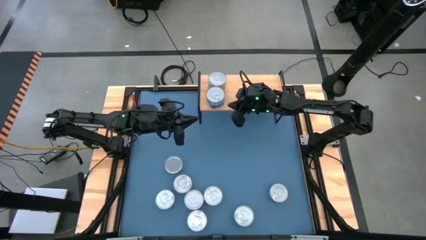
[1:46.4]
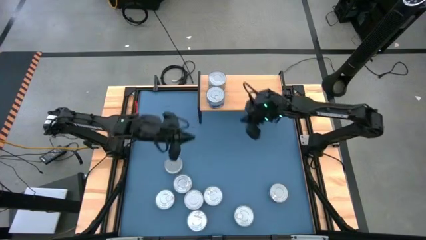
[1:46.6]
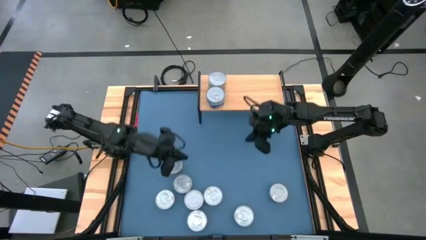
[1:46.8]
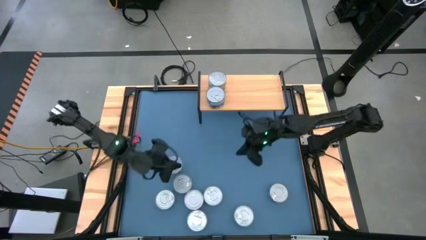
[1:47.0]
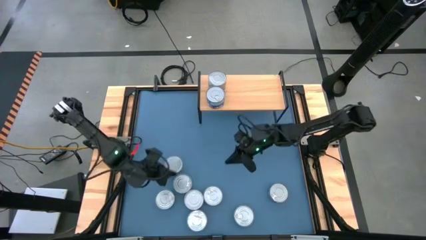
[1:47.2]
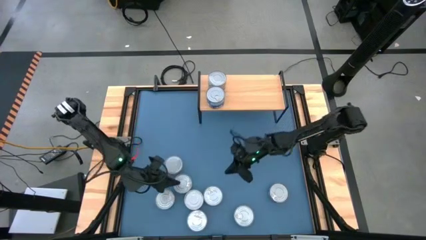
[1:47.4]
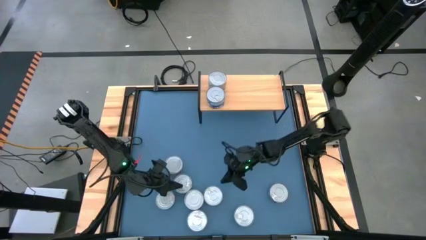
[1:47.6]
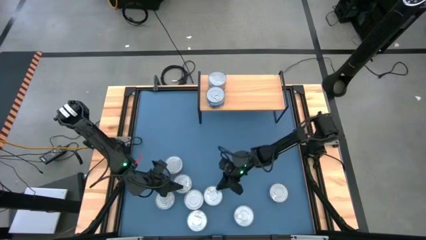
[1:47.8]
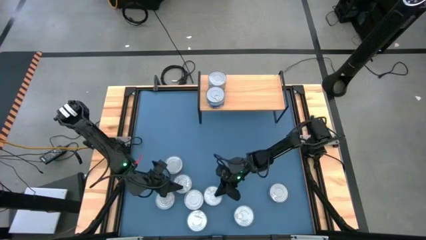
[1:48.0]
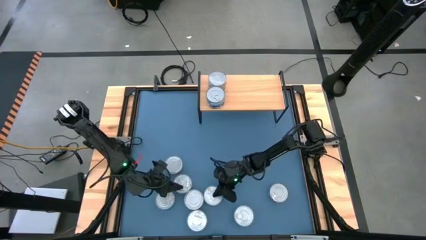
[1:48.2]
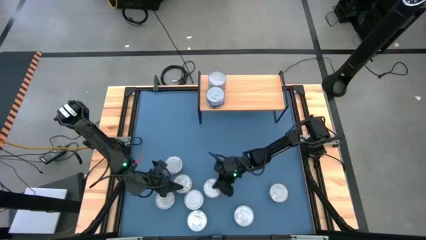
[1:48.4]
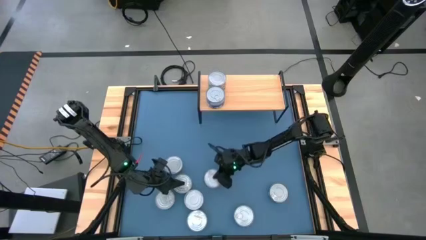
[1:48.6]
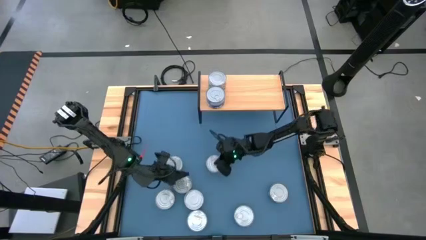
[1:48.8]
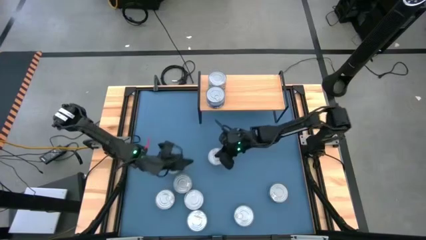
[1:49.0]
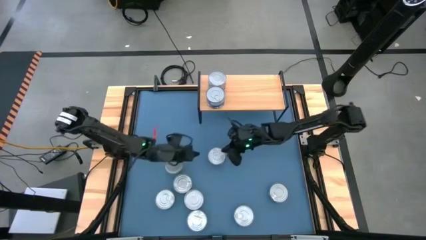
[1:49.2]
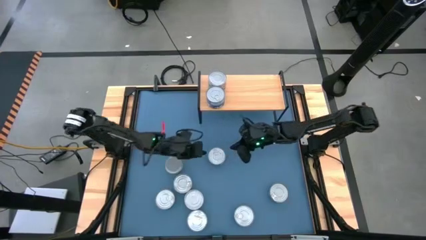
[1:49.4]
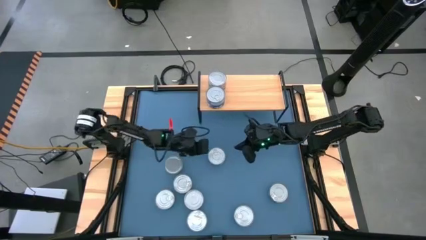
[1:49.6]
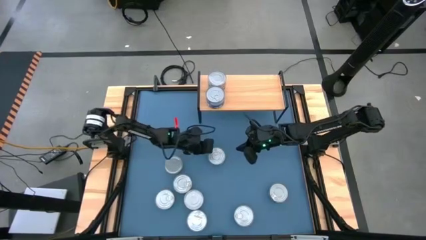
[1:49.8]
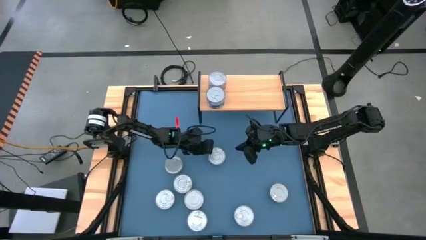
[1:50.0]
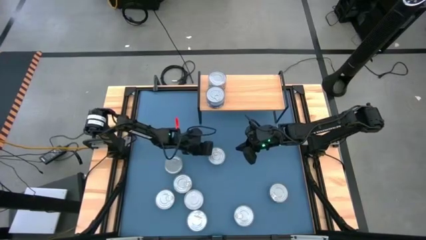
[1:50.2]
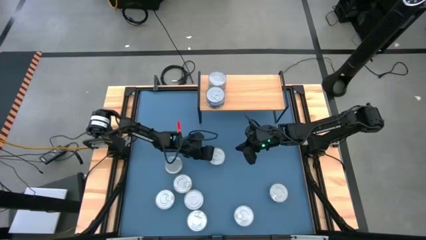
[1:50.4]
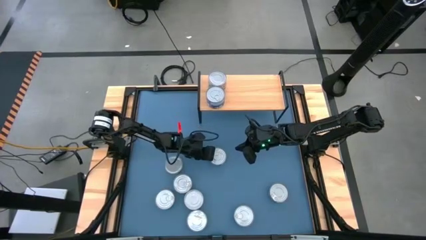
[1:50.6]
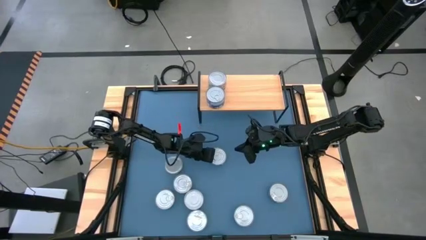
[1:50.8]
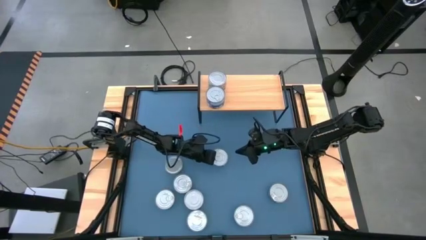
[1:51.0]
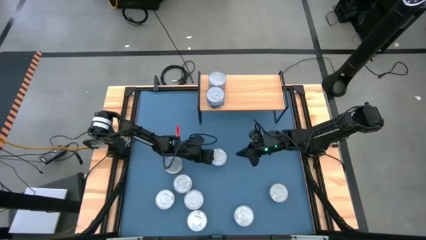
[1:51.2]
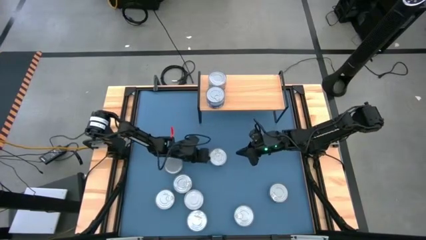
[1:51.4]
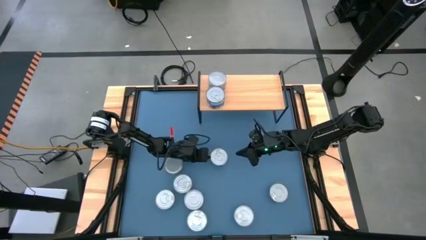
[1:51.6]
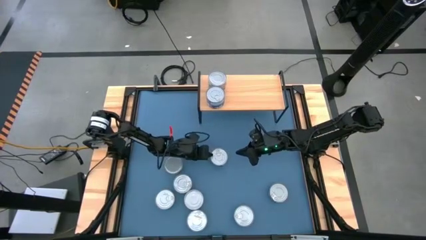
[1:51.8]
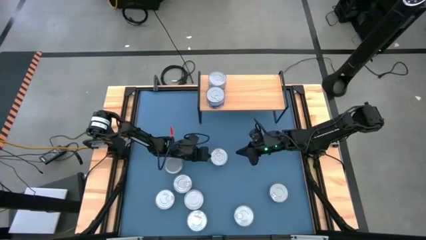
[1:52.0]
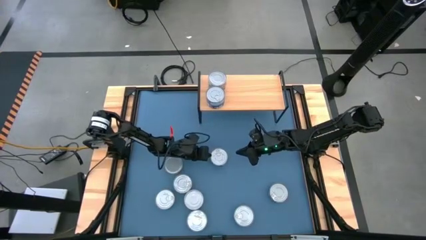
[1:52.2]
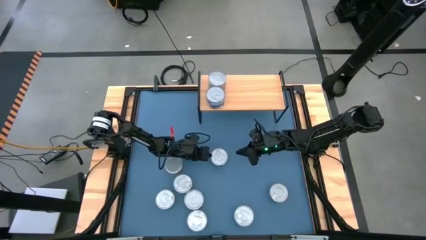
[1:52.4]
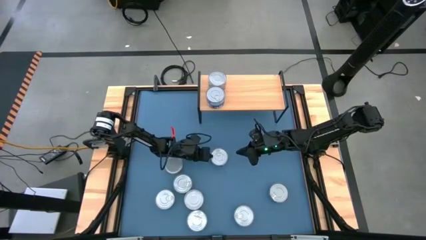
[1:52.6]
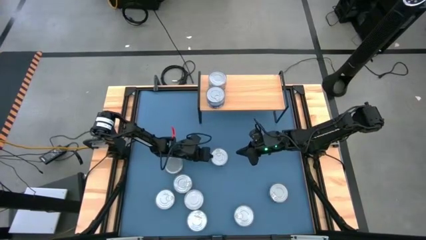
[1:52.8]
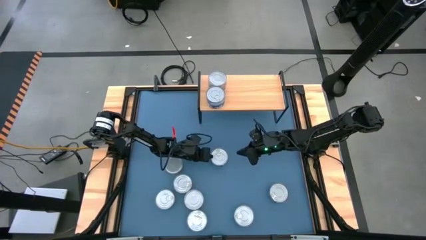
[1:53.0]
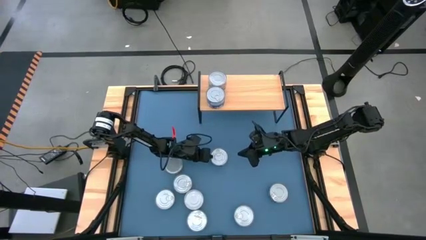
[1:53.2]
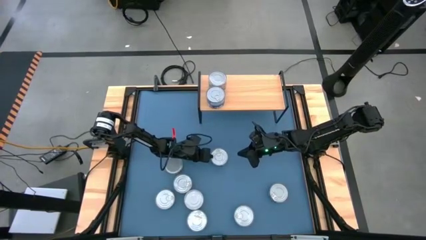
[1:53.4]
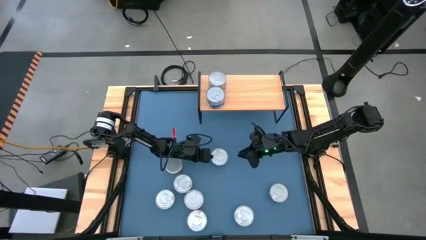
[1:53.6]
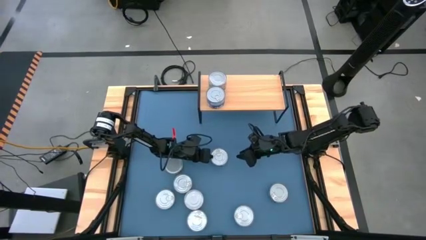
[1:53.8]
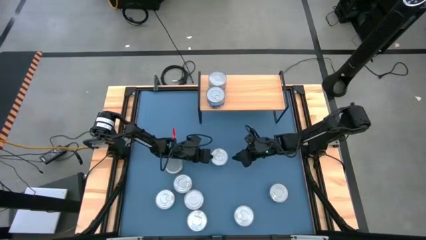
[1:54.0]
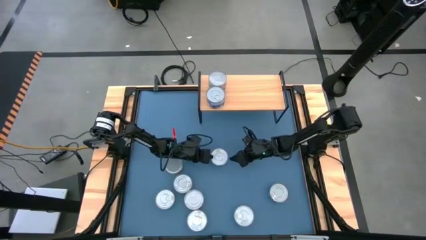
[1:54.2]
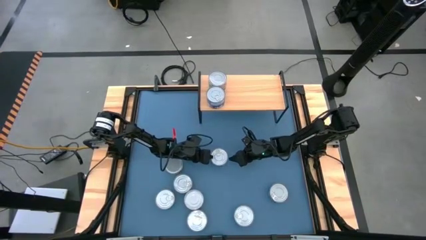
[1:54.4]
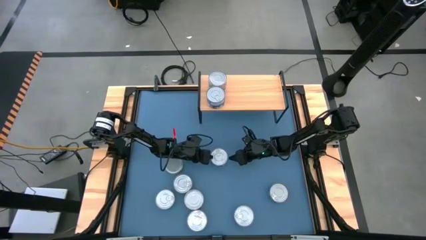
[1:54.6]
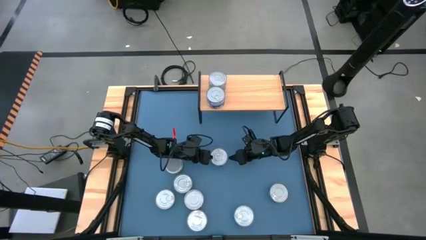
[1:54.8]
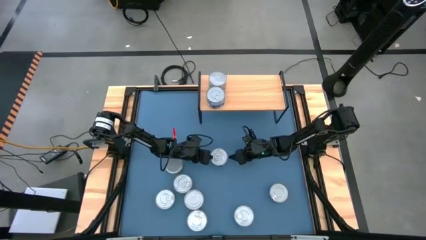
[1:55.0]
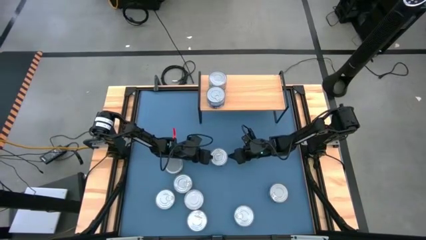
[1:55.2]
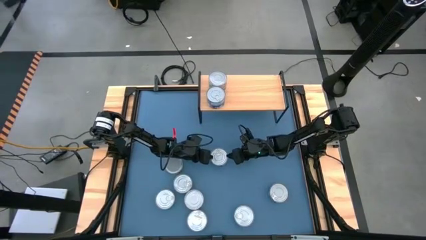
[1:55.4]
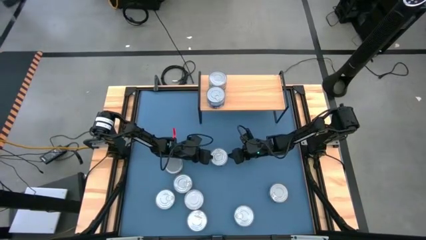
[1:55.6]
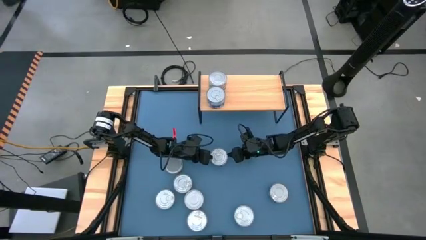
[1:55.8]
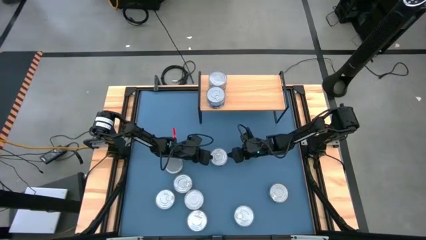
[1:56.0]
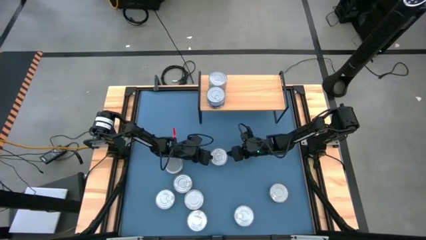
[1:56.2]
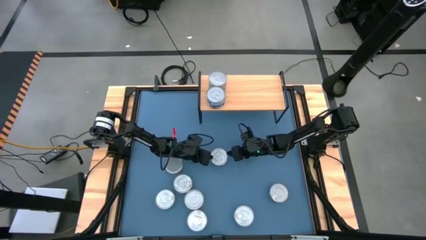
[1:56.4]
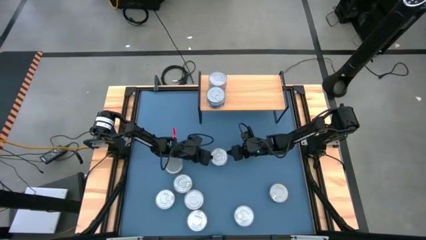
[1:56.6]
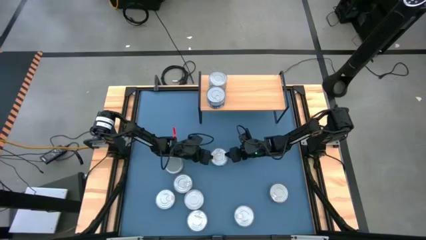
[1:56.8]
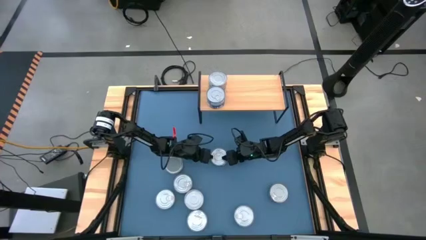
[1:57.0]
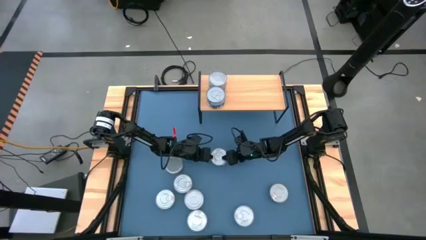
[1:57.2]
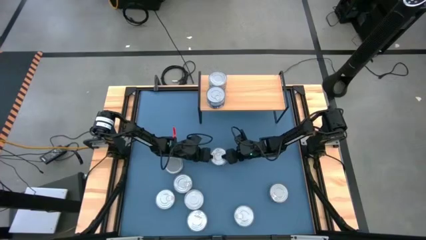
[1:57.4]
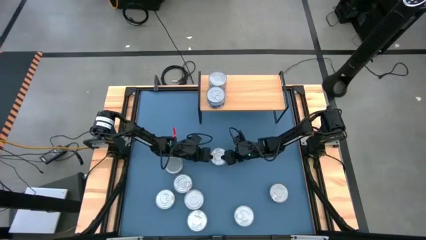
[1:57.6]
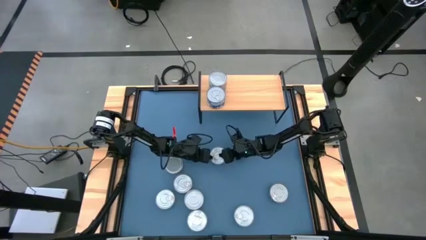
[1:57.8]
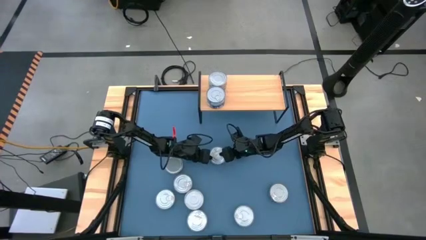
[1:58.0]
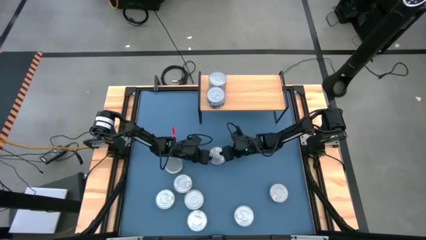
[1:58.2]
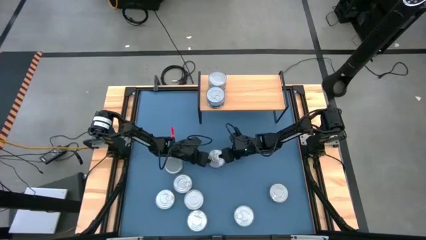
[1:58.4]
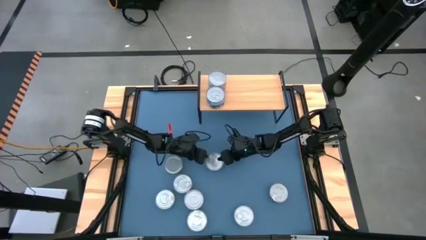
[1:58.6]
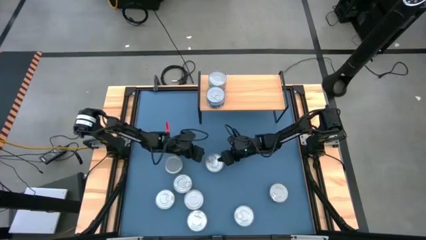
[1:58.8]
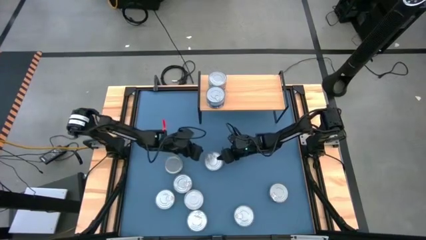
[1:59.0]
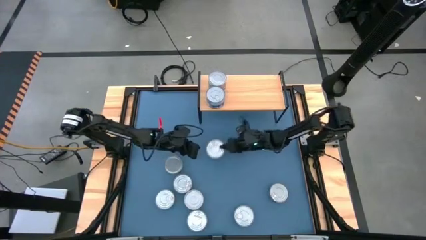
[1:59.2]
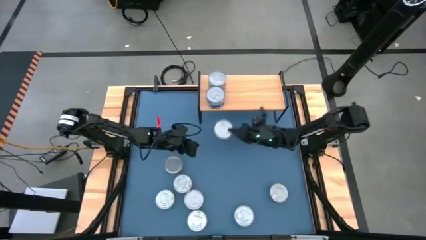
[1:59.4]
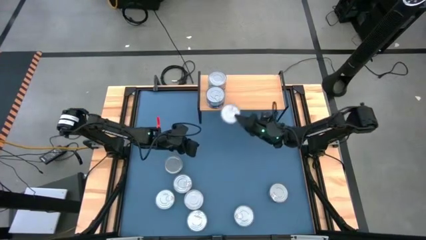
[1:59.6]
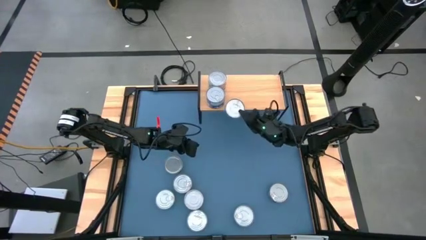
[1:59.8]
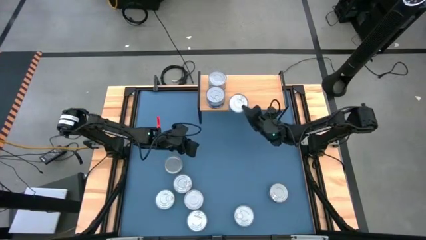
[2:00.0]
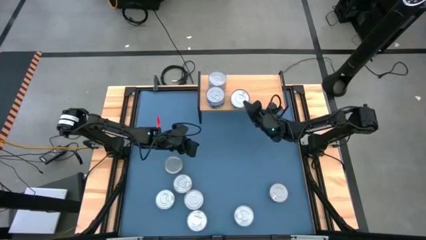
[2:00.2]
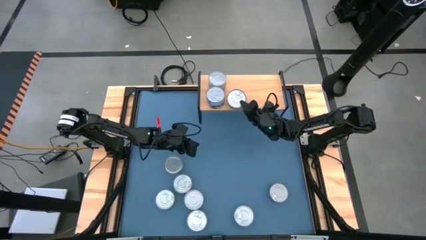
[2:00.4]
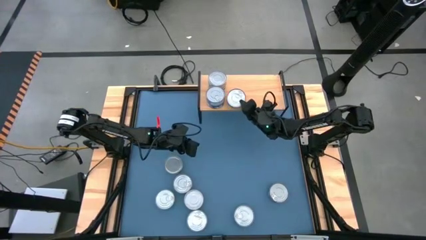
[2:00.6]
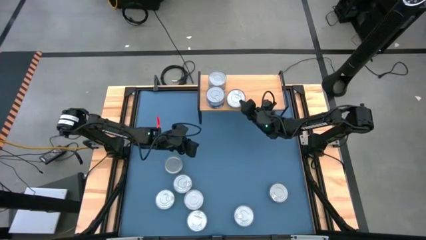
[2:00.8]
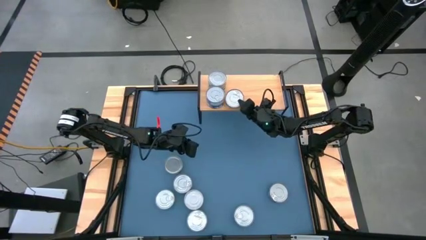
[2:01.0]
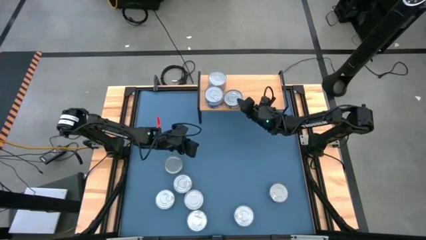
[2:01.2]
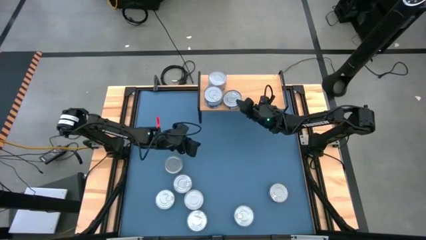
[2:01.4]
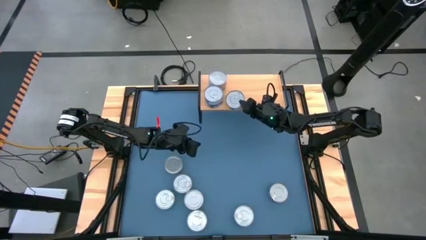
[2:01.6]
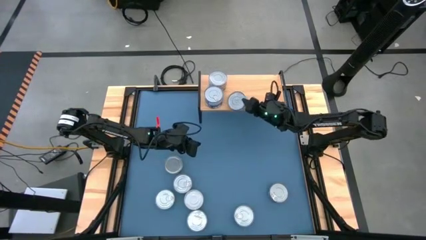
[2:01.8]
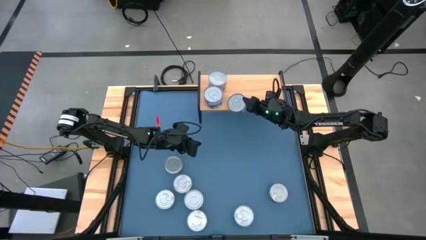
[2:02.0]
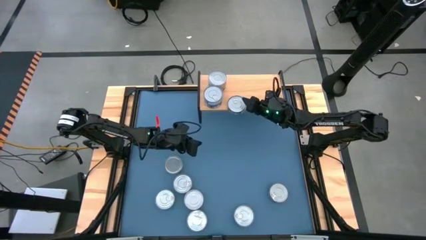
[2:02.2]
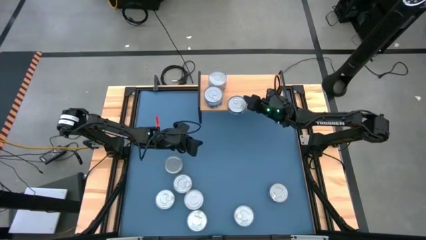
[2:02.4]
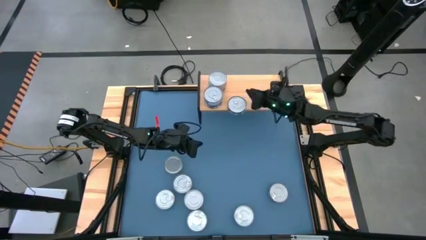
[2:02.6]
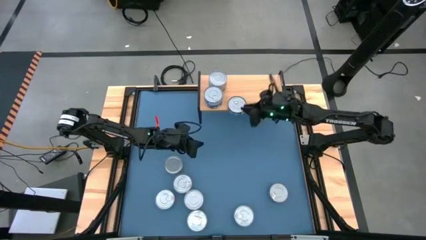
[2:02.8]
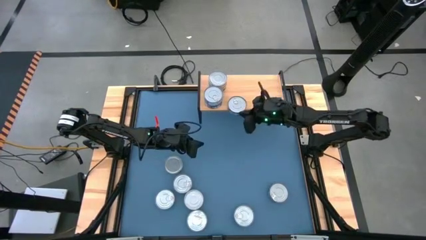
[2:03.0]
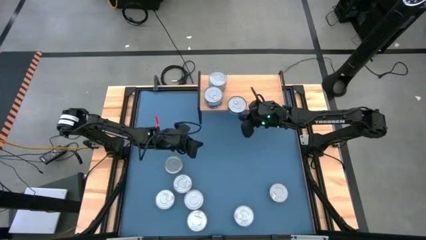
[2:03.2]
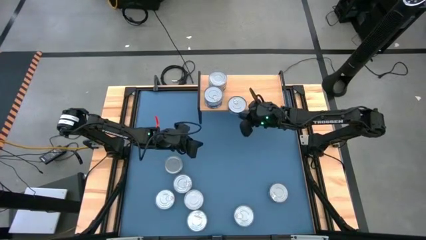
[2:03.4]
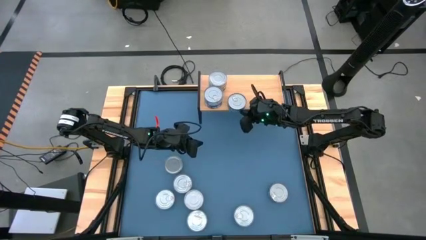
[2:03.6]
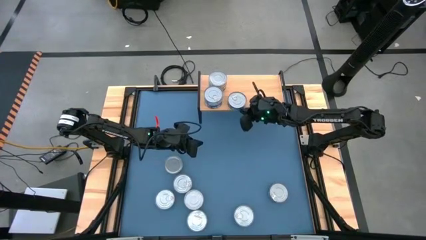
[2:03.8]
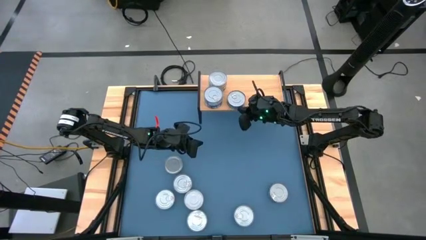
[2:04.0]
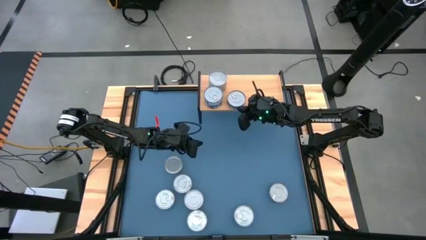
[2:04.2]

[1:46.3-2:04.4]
Task: Stack canned seafood by type on shelf
Put the blue tuna can on the shelf
